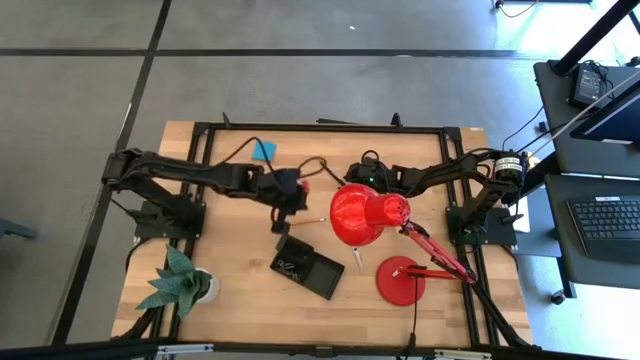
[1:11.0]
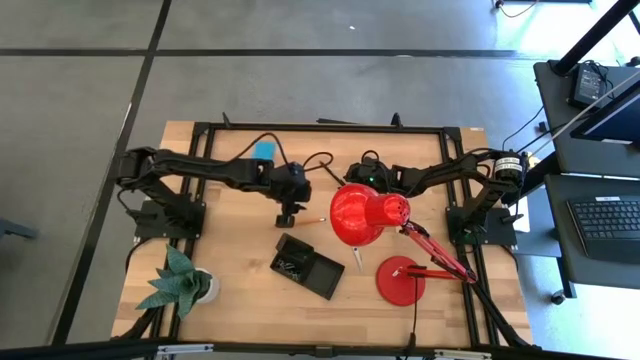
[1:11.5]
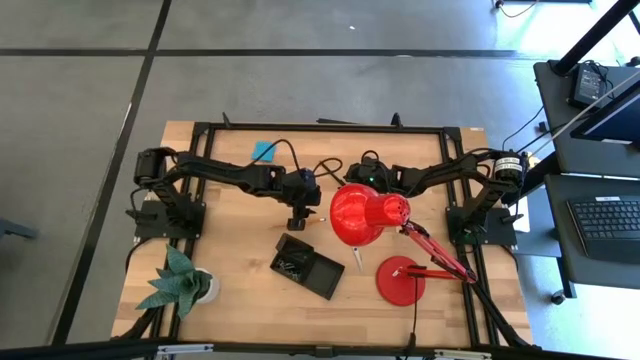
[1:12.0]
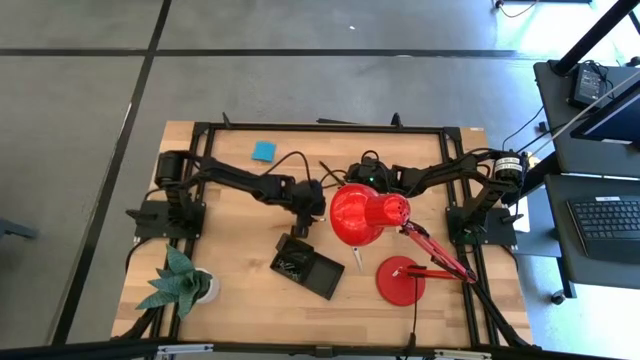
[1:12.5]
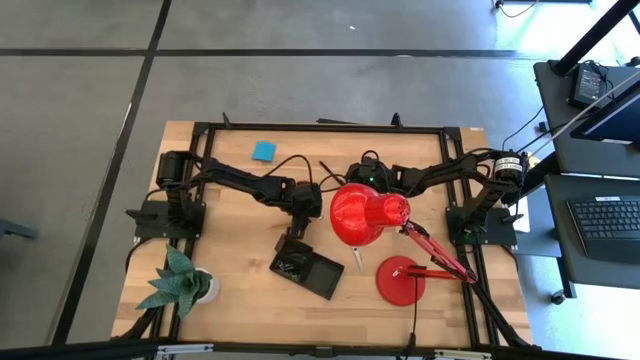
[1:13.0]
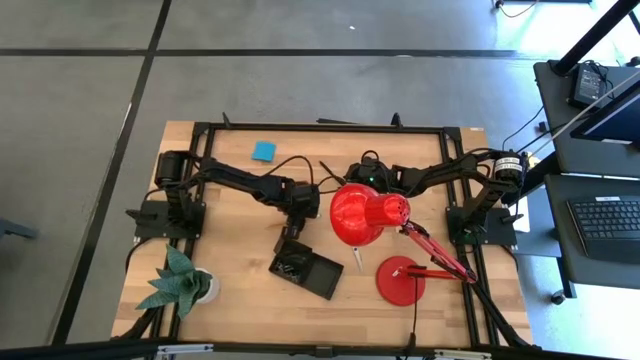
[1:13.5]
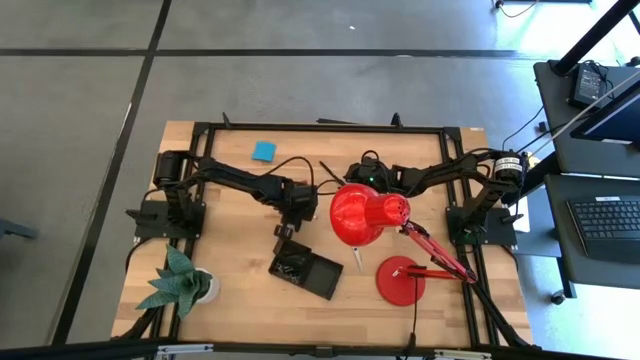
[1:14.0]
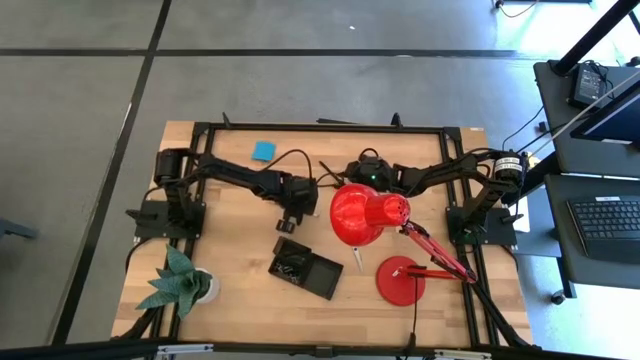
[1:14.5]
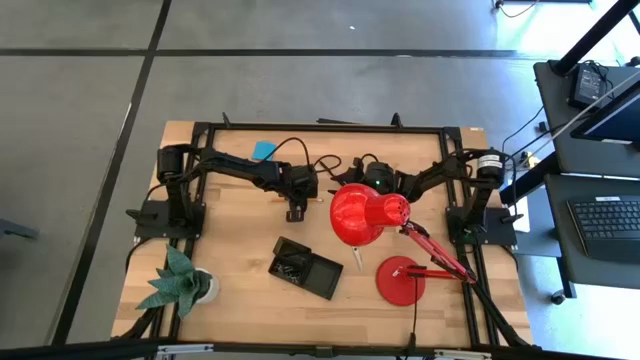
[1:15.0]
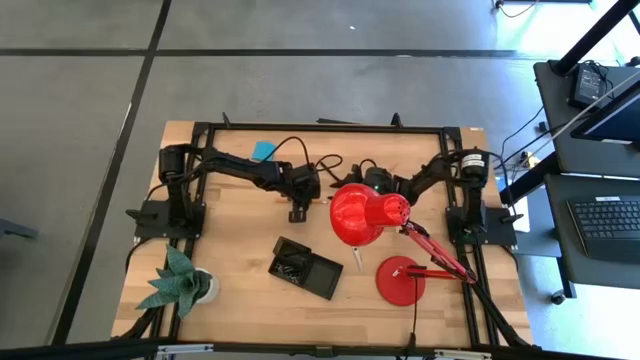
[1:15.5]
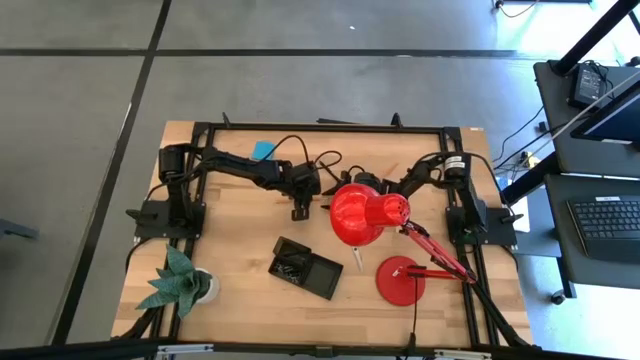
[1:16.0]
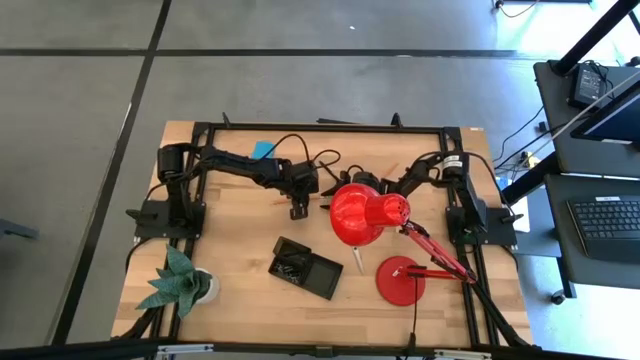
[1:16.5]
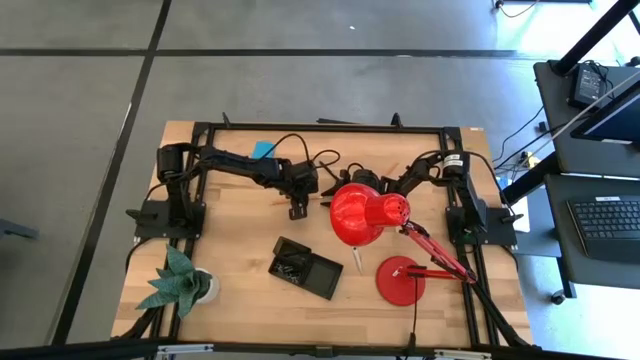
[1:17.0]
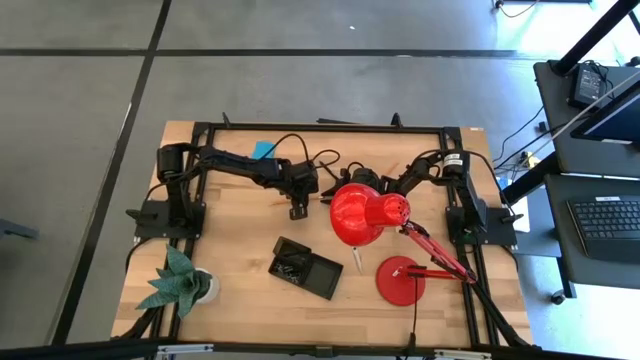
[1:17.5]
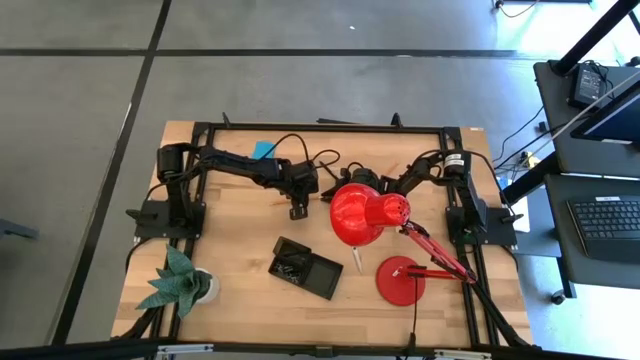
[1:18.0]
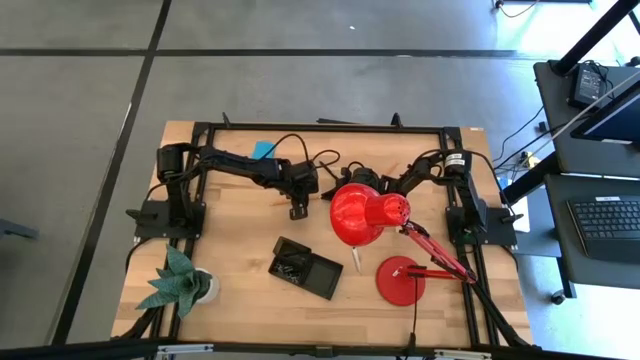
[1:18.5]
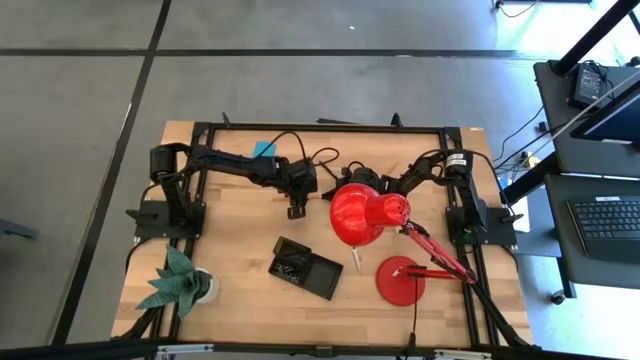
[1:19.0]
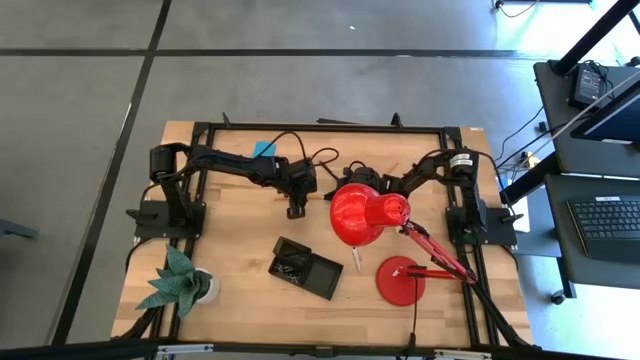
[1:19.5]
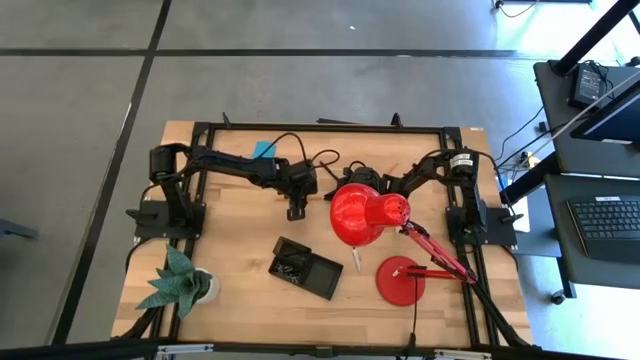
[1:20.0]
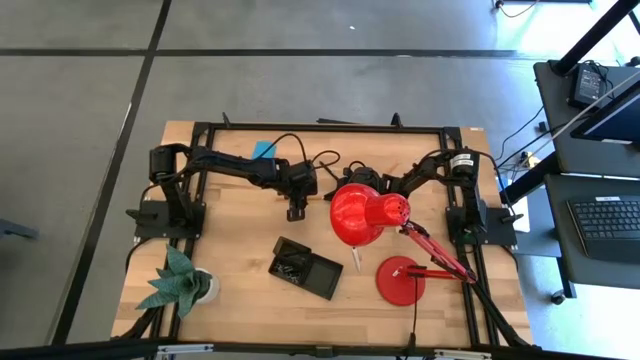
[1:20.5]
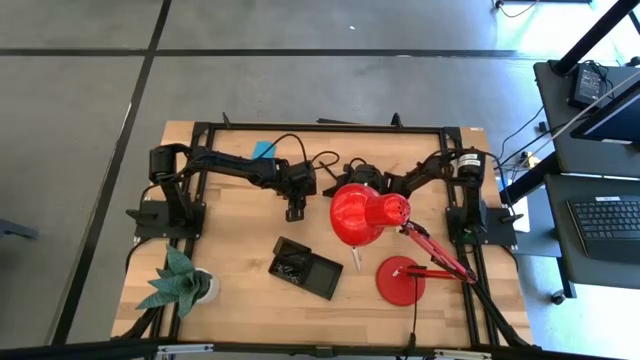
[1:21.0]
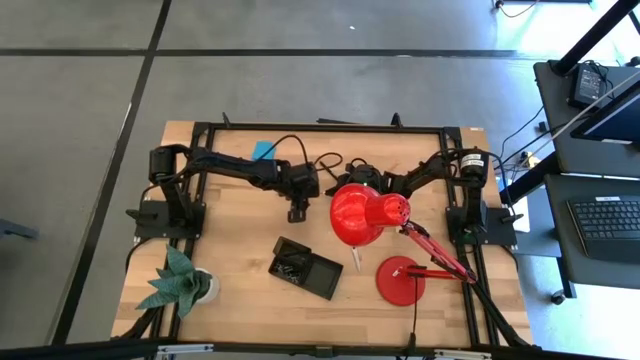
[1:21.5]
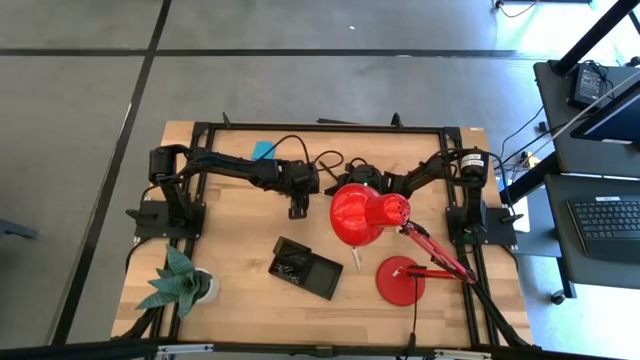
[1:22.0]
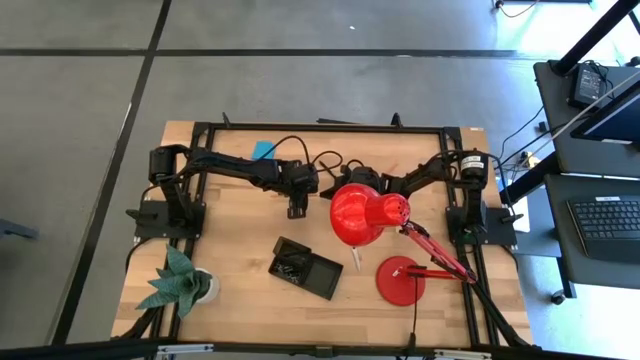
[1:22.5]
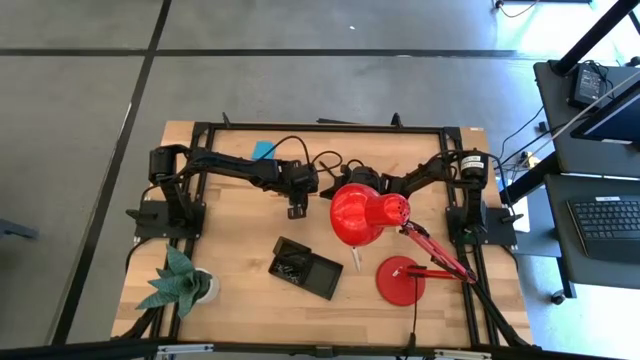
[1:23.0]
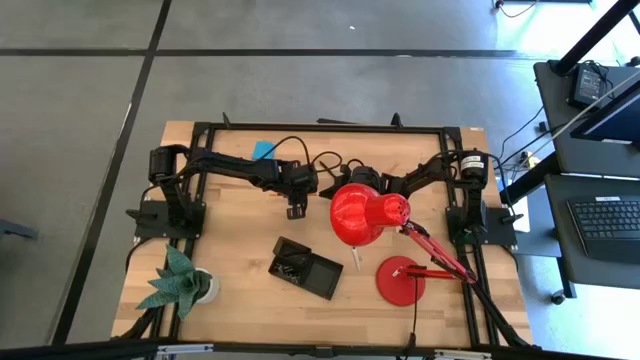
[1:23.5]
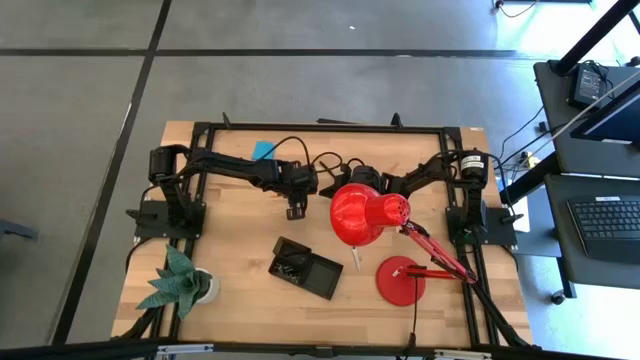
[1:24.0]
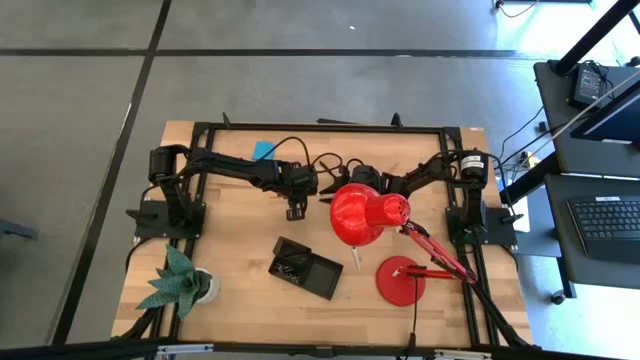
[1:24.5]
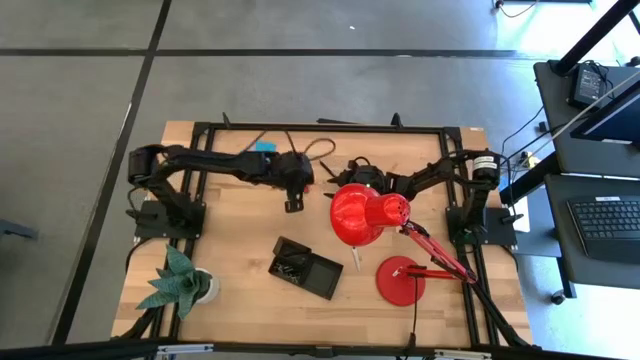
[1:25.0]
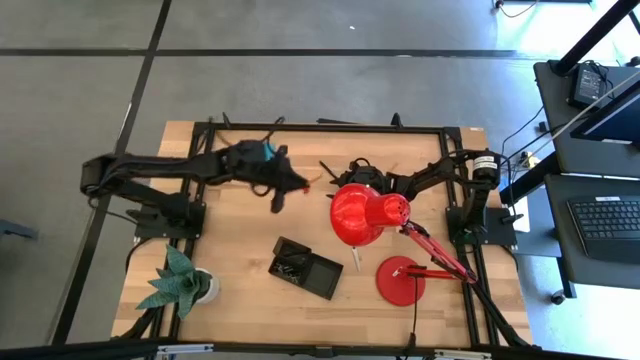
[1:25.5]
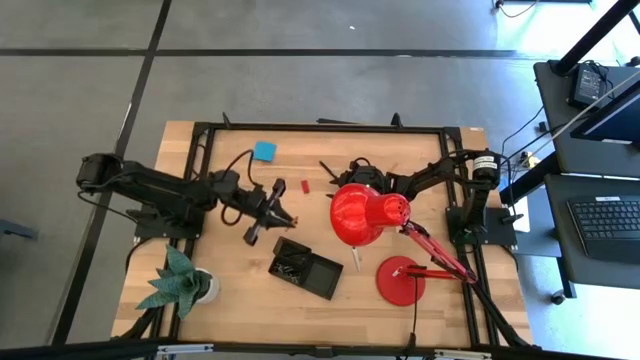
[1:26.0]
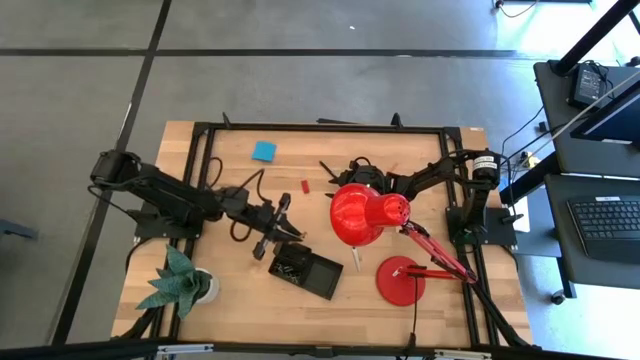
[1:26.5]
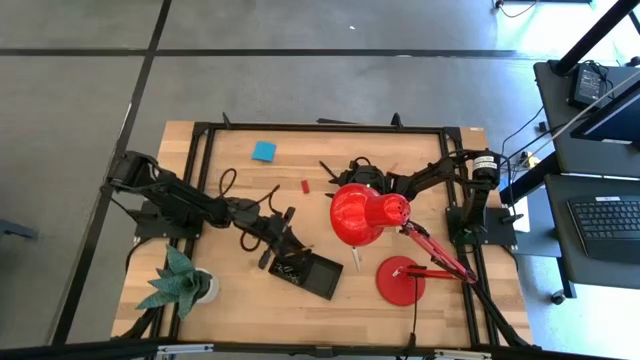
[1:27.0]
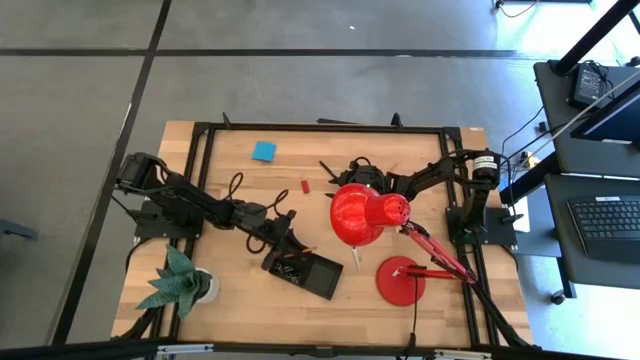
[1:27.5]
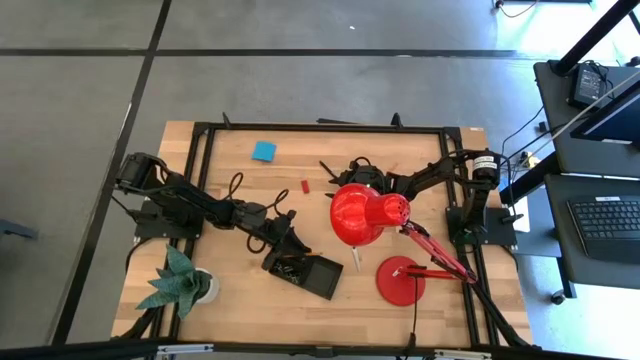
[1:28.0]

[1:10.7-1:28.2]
Task: Pick and place office supplies into organizer
Put the left orange pencil into the desk organizer

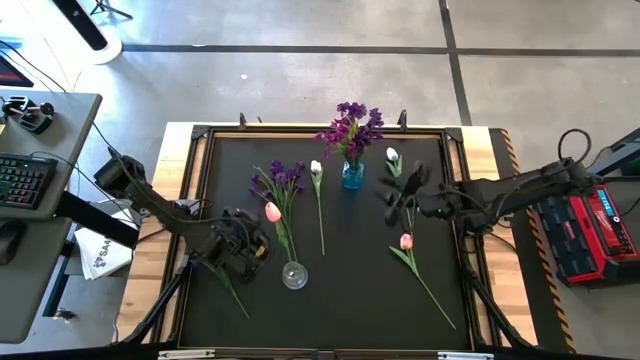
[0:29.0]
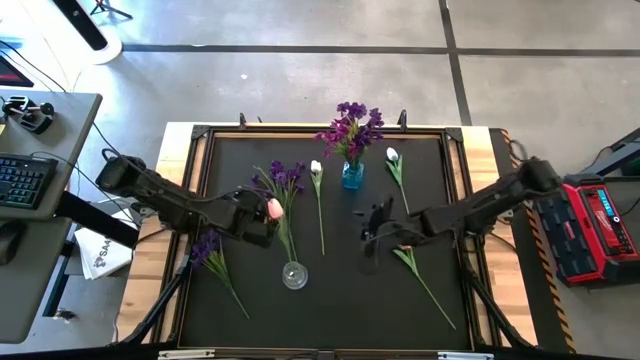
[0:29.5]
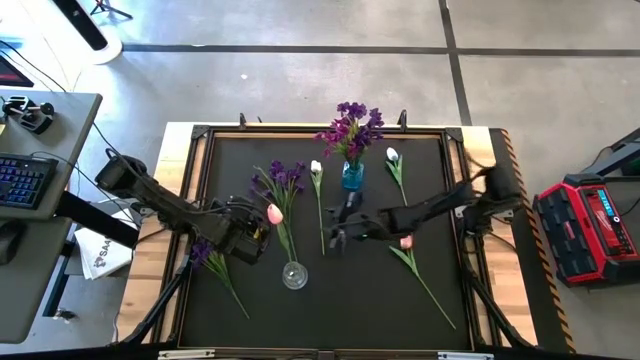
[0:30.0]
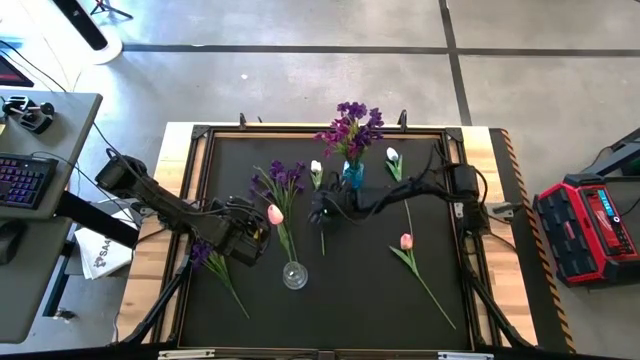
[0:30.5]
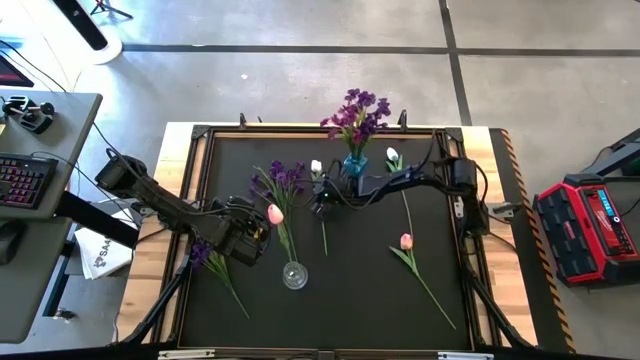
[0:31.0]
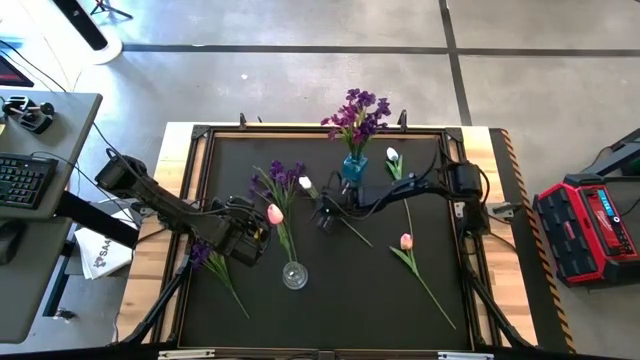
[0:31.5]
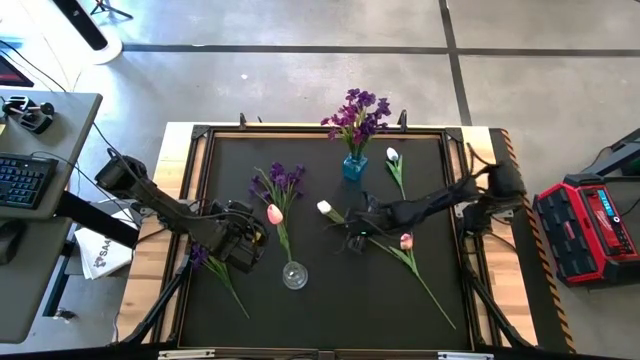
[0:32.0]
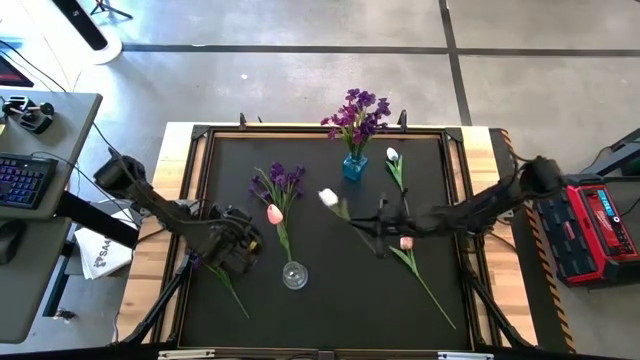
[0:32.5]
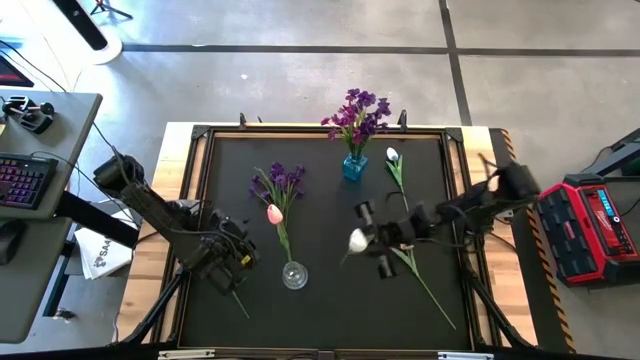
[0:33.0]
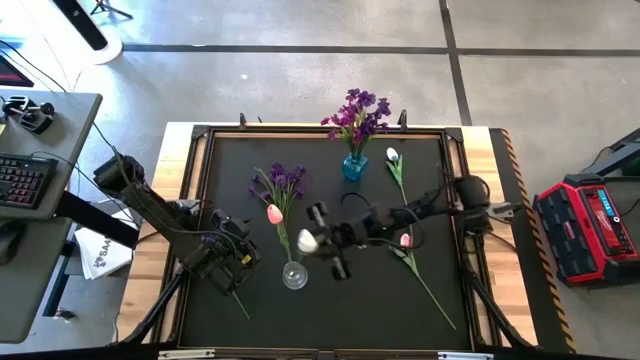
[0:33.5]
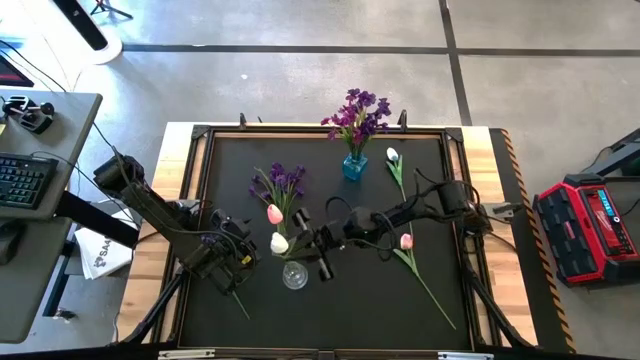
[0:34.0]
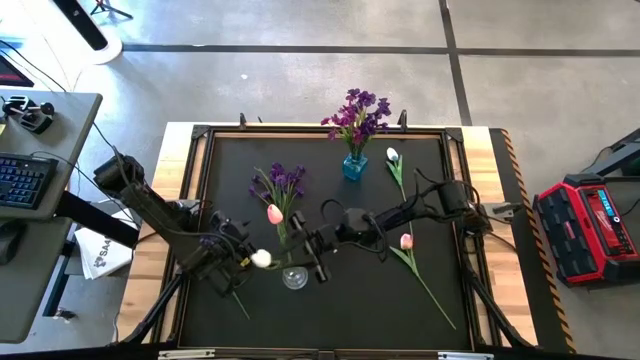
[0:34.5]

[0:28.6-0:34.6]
Task: Sort flowers into vase by color
Put the left white flower into the transparent vase
